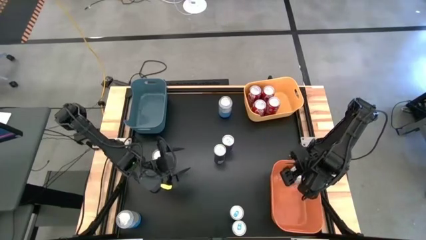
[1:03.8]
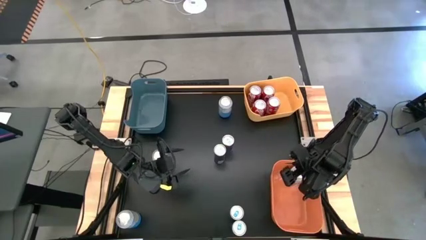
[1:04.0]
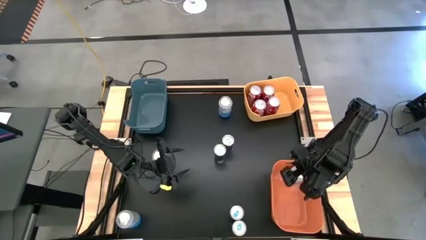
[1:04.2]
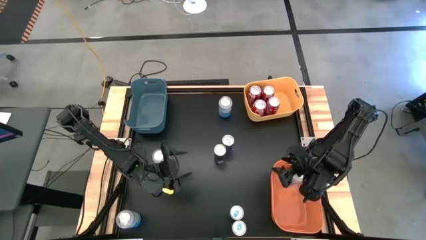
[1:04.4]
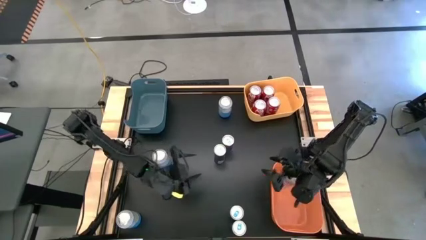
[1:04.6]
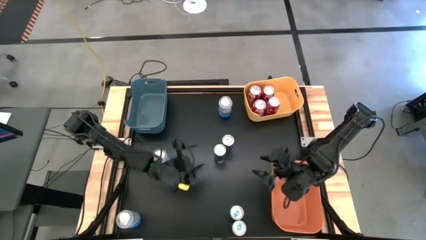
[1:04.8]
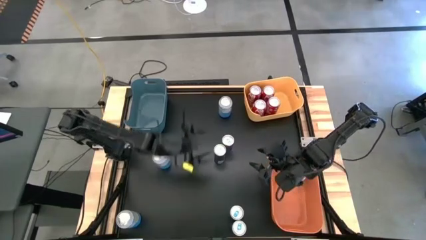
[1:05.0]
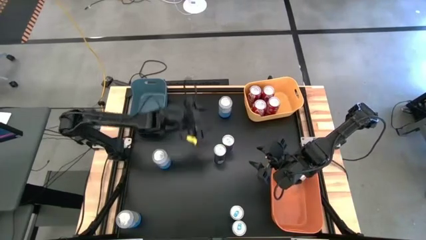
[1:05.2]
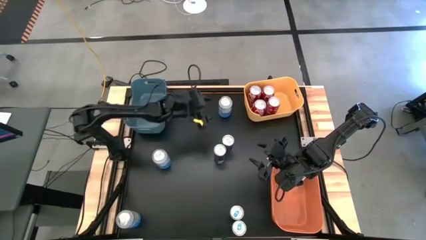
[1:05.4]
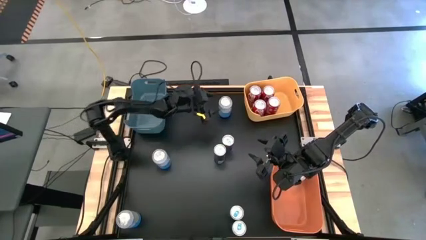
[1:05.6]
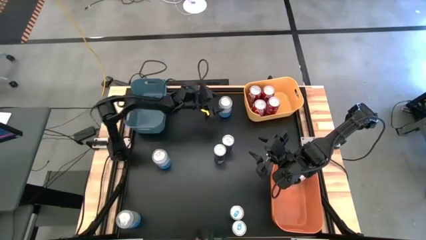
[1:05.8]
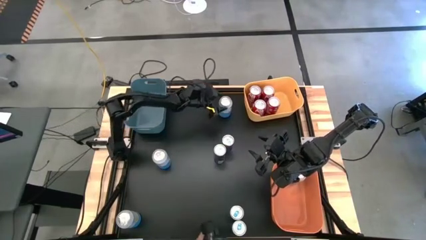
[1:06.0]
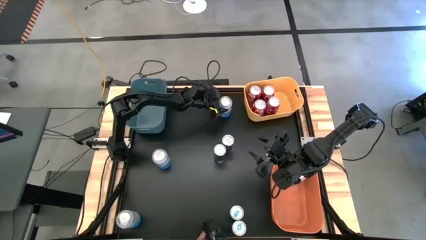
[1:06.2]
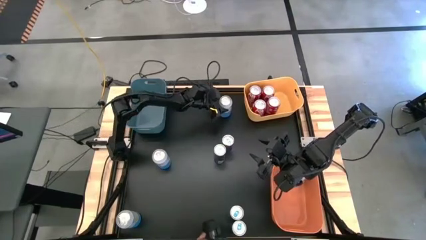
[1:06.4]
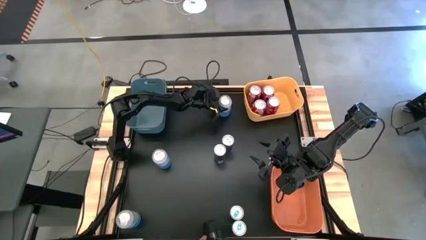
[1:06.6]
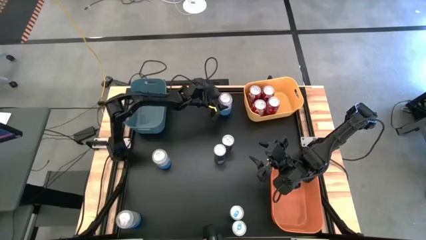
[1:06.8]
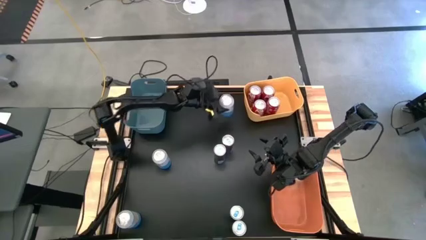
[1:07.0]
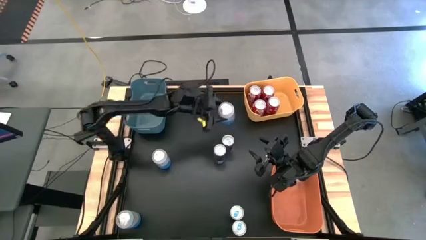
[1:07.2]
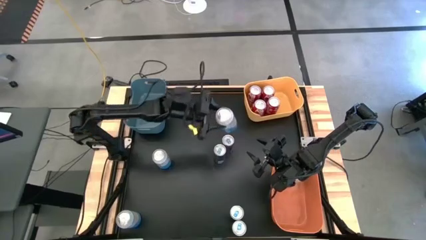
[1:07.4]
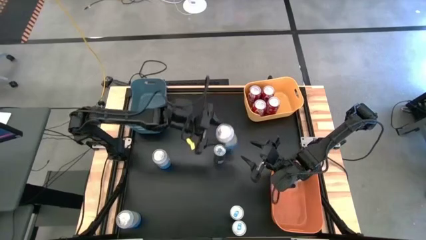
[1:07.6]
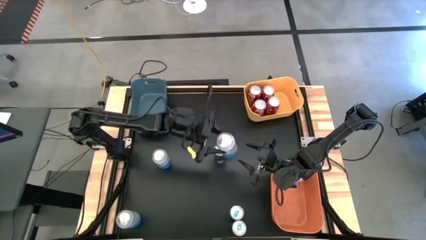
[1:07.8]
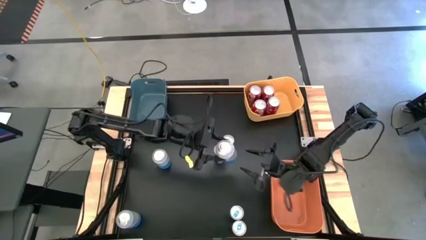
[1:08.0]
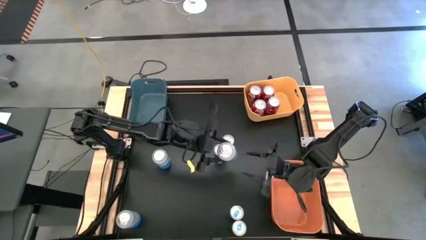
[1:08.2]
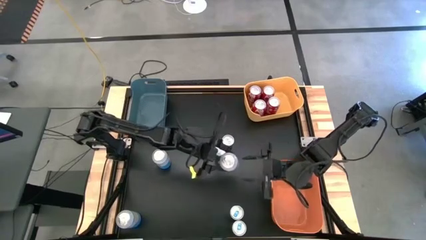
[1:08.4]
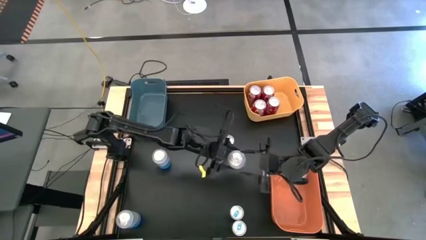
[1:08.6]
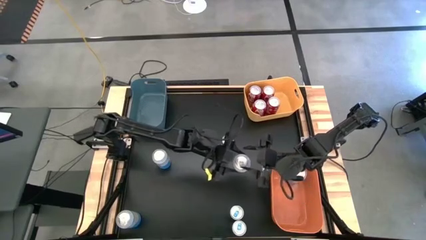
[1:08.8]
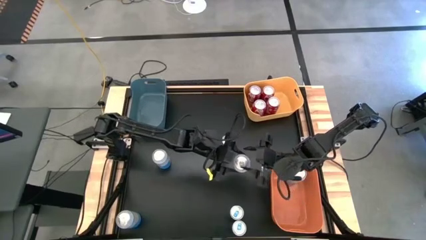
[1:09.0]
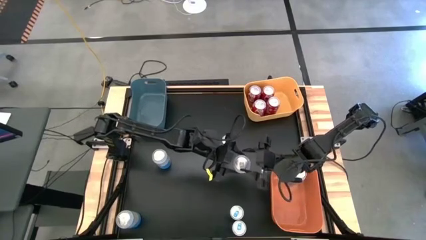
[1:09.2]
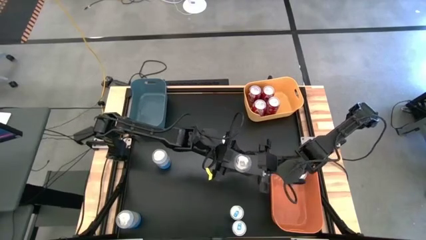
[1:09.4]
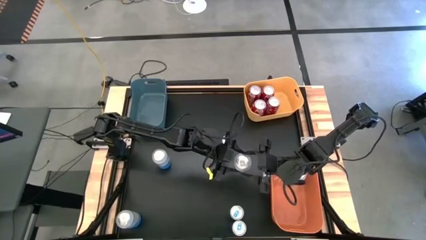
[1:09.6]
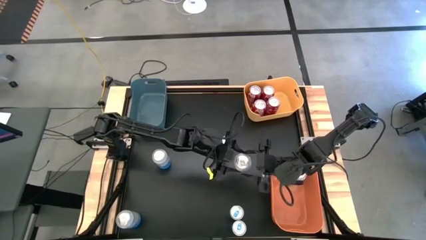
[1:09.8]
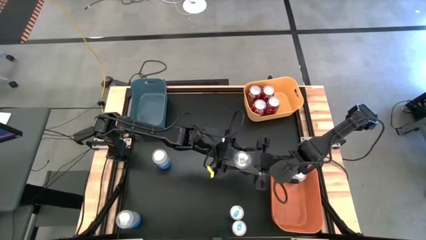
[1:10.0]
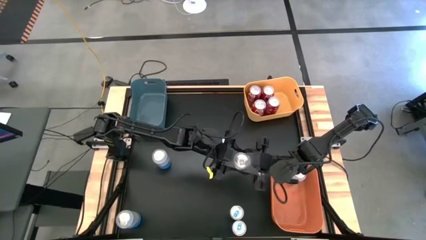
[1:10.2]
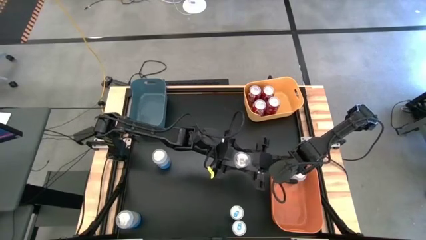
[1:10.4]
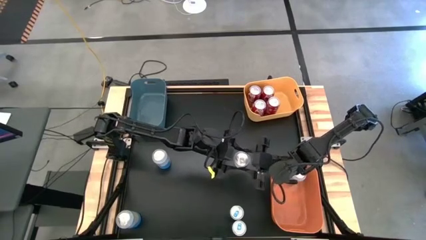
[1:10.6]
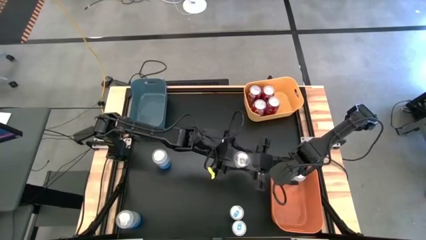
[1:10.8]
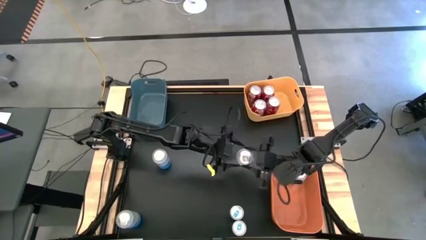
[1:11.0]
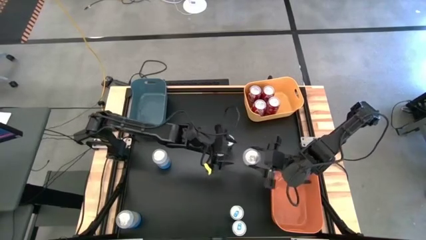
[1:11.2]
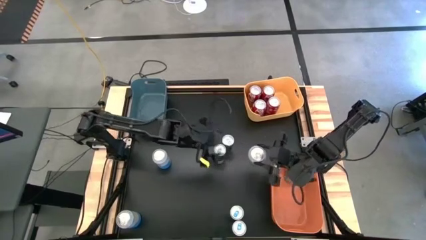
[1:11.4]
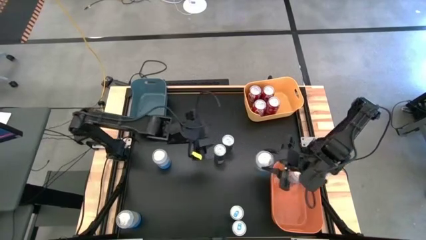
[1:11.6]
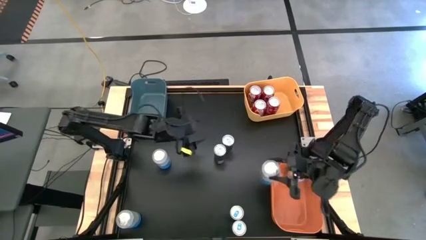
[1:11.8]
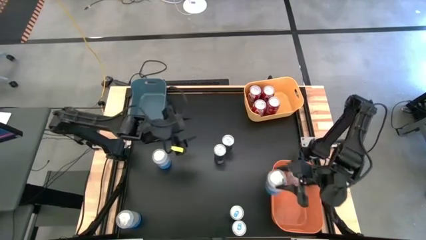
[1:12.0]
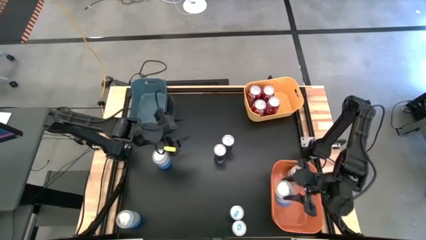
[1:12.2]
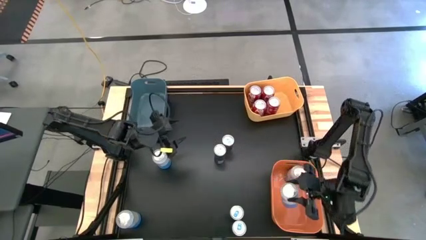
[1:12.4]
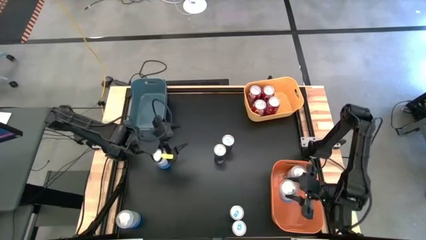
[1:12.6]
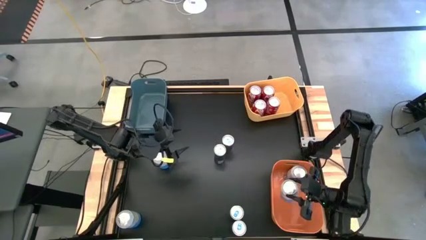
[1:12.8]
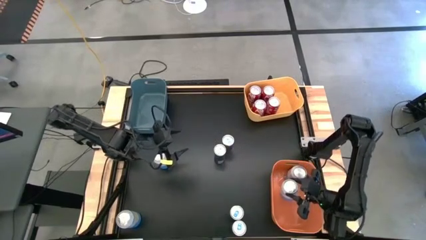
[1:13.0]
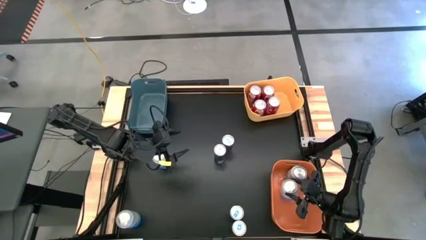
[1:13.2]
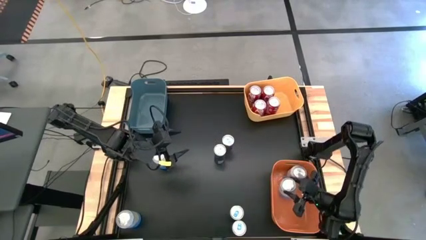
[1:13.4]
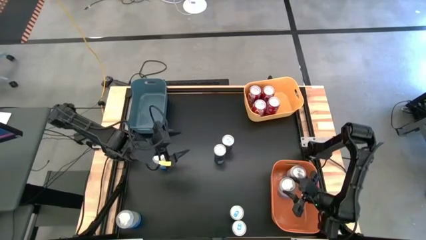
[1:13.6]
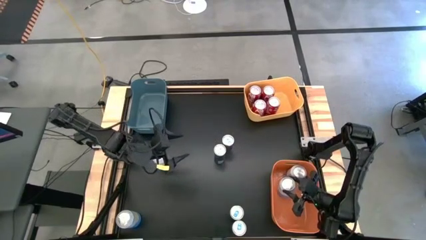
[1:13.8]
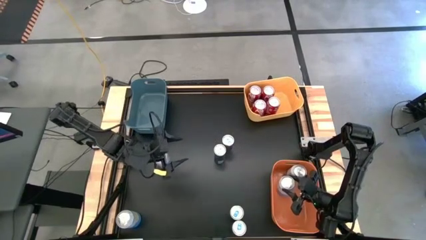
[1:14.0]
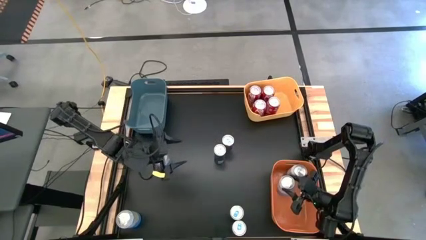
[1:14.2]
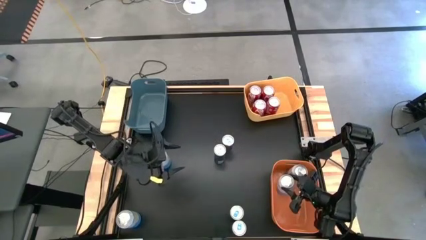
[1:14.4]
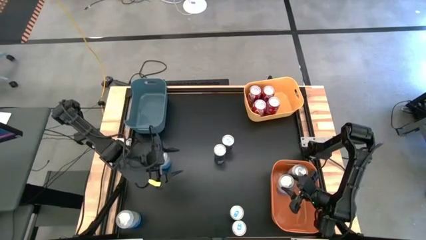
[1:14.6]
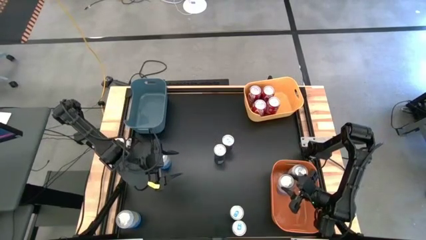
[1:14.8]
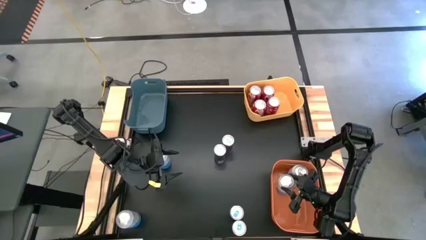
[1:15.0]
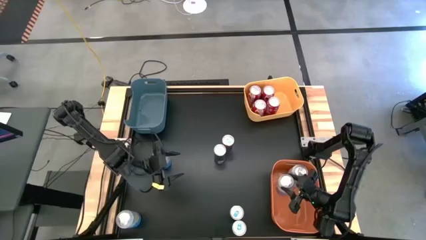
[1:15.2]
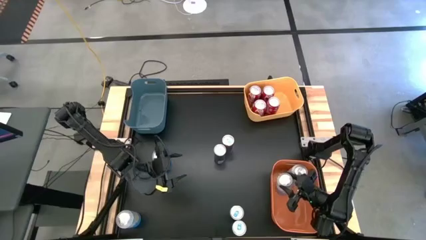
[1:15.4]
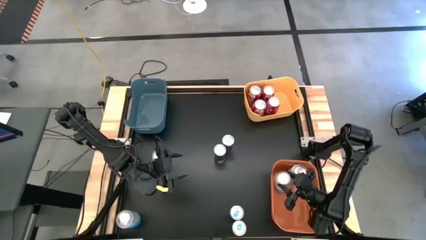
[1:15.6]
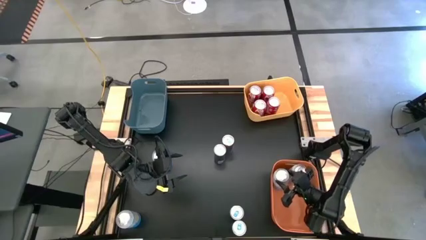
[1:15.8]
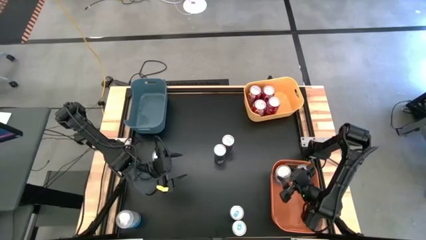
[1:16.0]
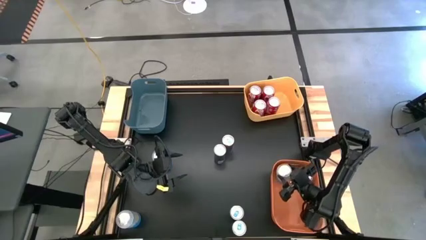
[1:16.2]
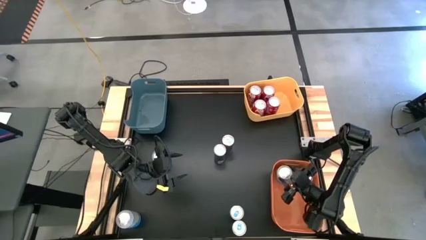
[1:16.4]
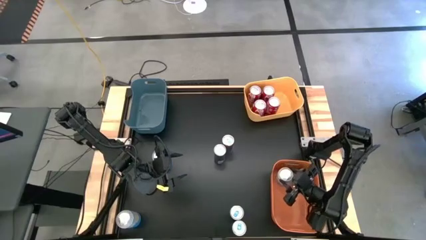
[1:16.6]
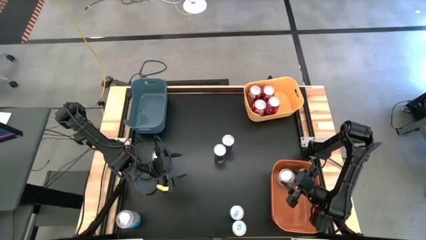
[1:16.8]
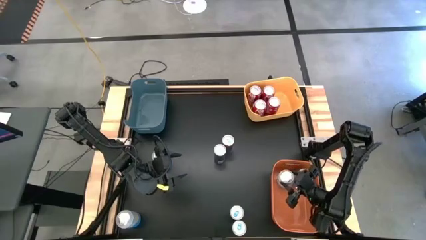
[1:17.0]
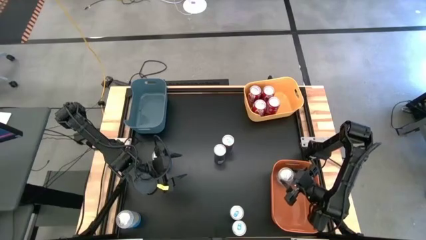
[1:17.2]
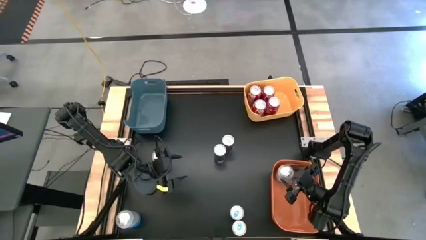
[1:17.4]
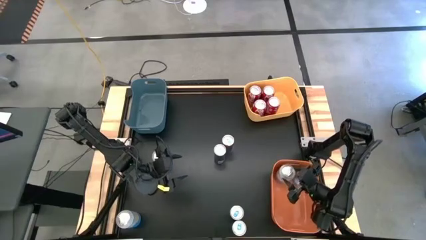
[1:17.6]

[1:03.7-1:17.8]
Task: Sort soda cans
Put the top white soda can into the orange bin

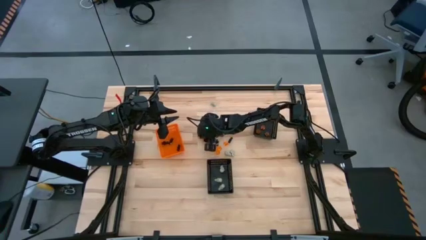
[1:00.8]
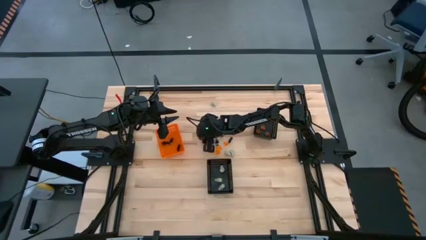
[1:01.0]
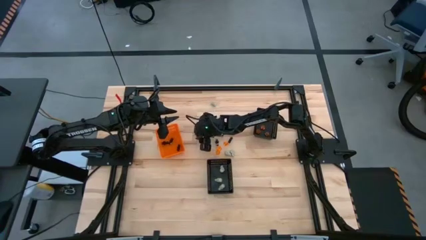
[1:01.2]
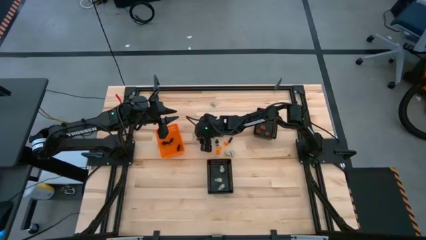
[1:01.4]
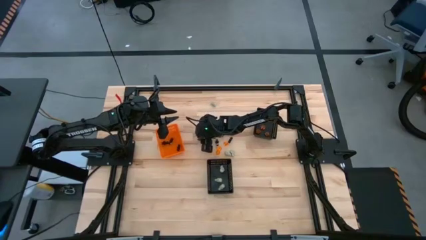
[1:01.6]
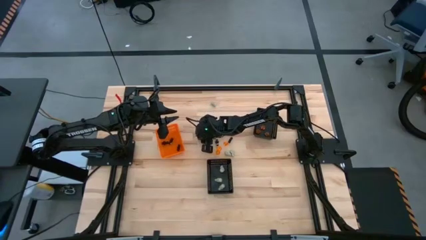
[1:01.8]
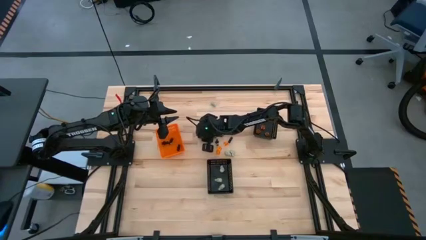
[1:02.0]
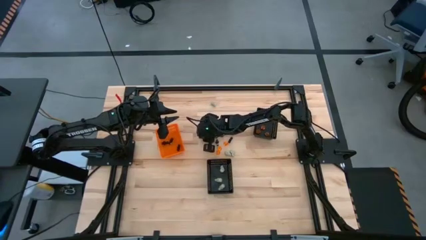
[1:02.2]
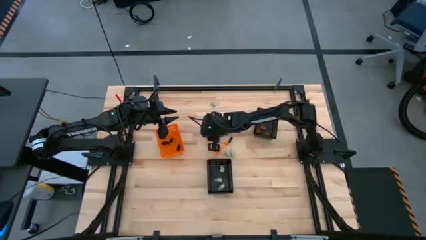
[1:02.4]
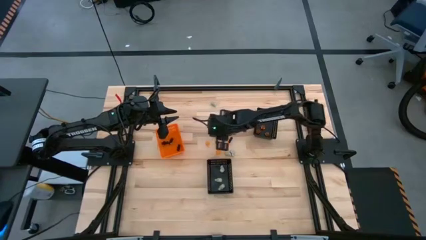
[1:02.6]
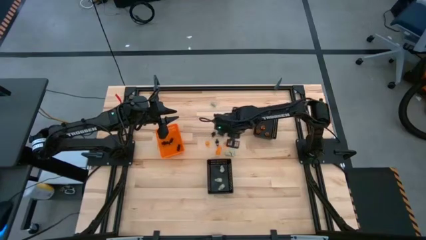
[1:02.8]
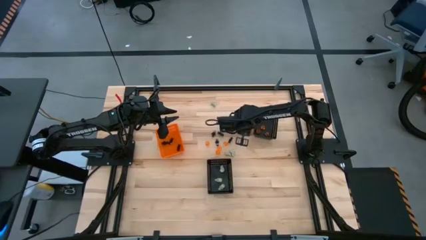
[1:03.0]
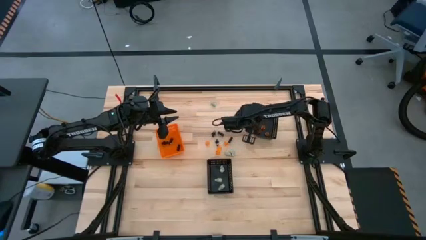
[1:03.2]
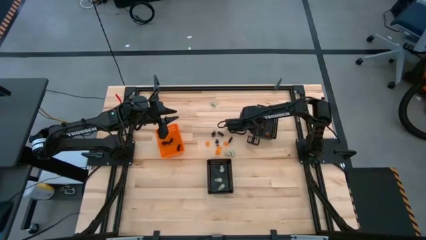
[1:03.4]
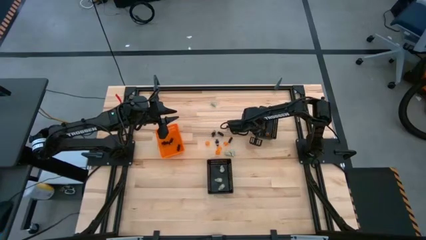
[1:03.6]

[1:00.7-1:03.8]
Task: Sort Halloween decoration
Put the orange pumpkin toy into the top black bin

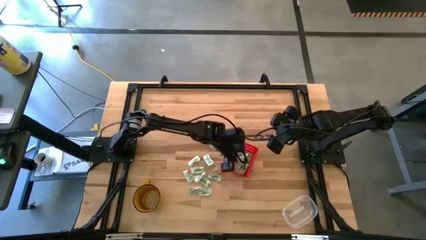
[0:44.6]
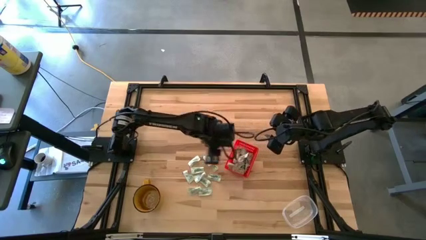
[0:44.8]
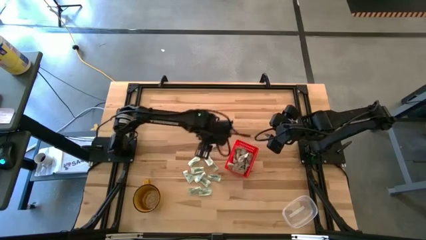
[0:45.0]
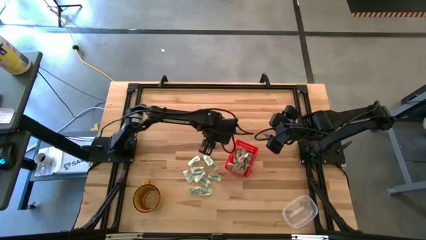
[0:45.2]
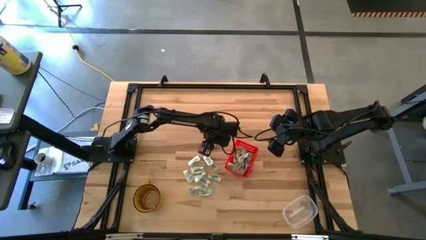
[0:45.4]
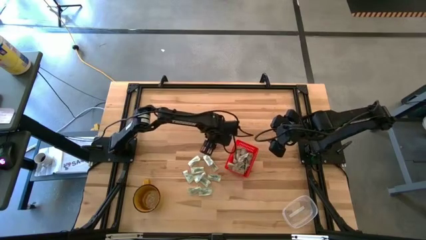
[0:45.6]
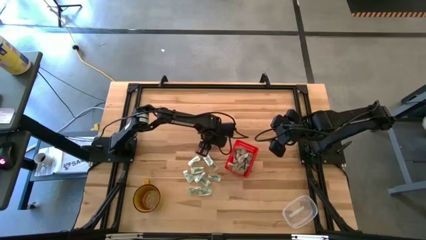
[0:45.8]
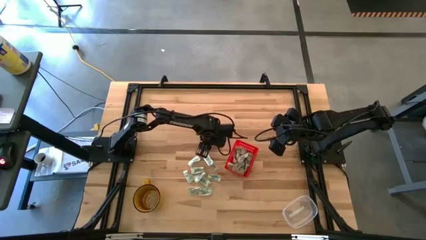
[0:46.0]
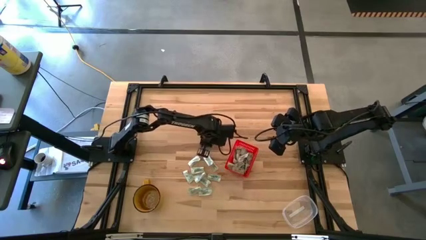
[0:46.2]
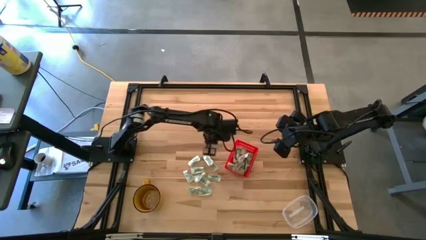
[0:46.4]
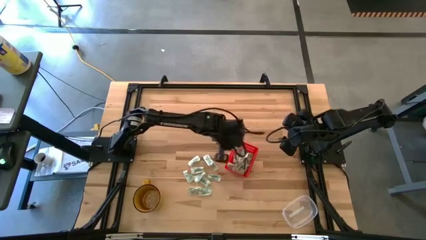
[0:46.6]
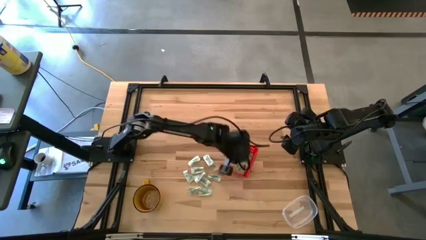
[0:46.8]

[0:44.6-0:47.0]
Task: Pick and place items into bin
Put the light green stevia packet into the red bin
